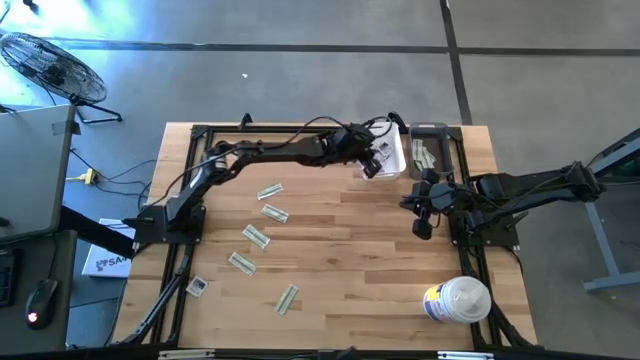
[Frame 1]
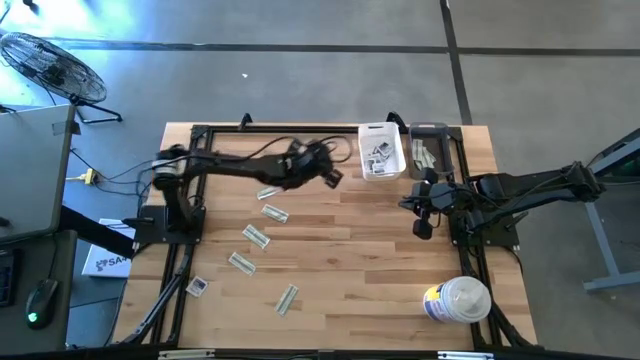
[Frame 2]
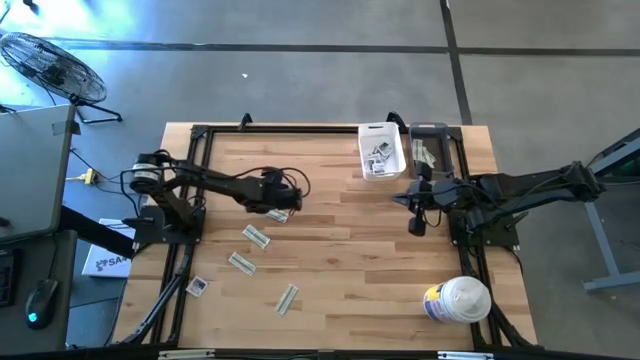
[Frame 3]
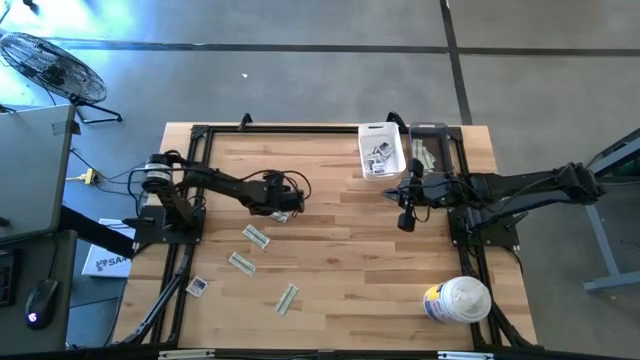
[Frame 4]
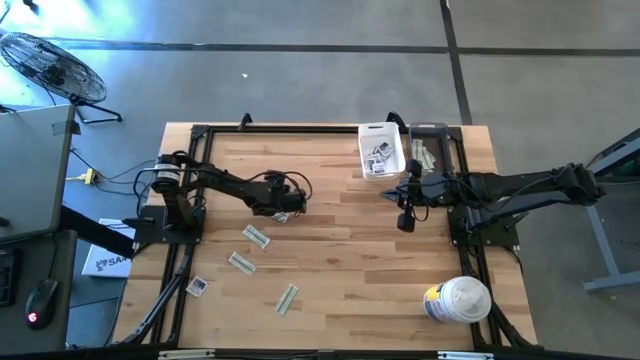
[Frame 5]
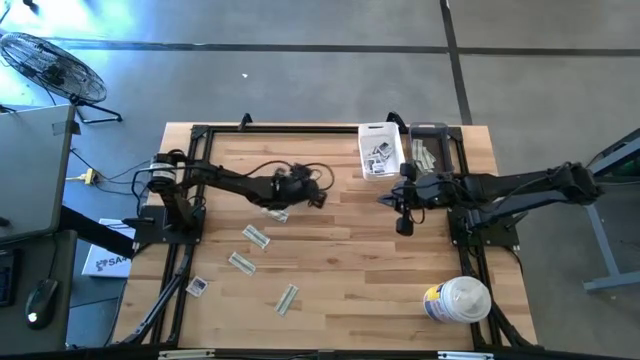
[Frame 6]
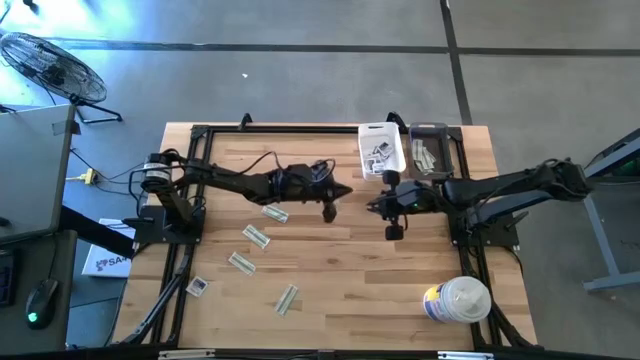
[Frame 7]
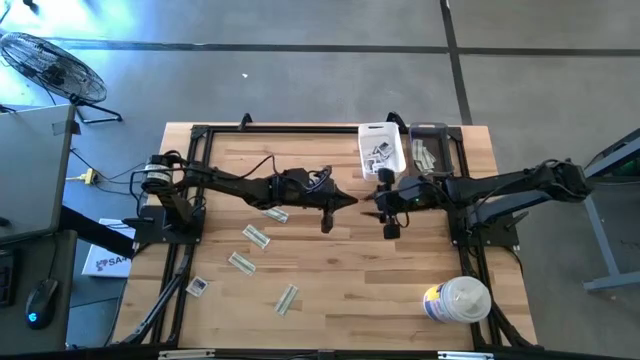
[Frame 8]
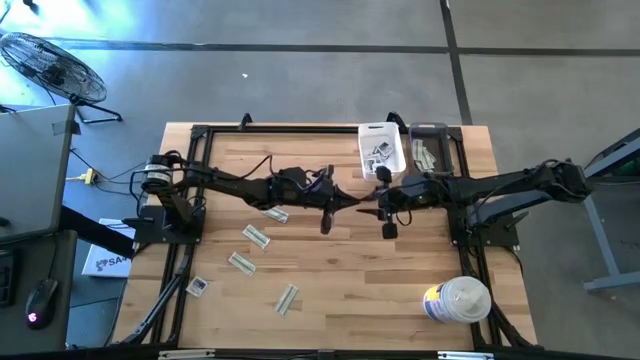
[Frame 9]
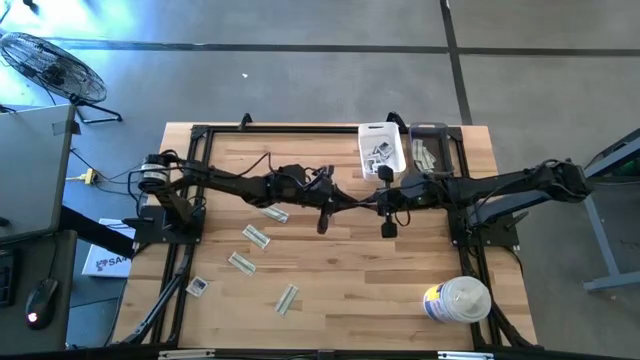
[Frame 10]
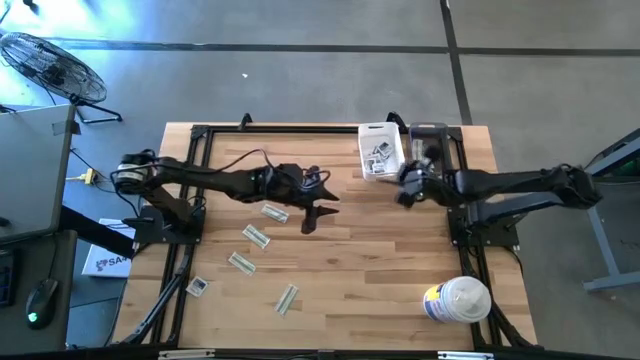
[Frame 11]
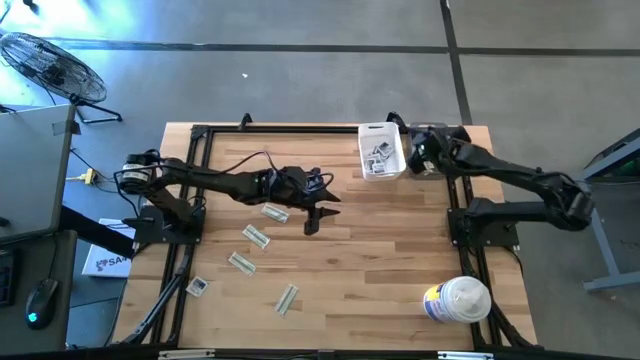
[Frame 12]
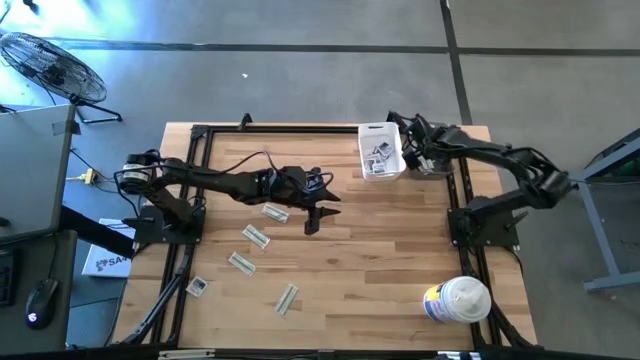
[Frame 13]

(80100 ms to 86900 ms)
Task: Pick & Place First Aid Supplies
Put the bandage into the gray bin

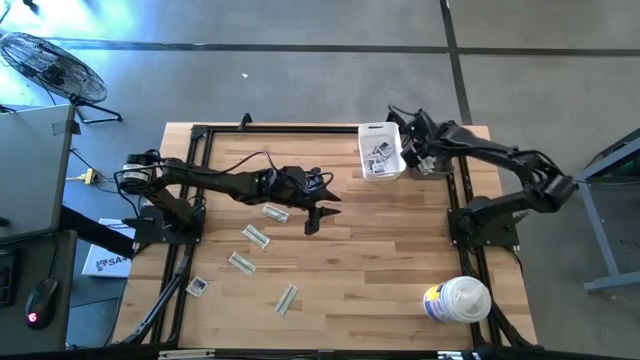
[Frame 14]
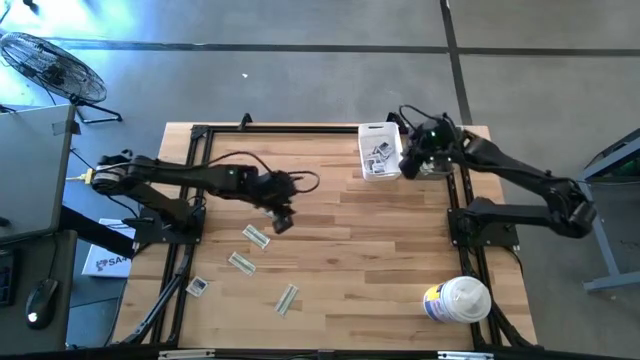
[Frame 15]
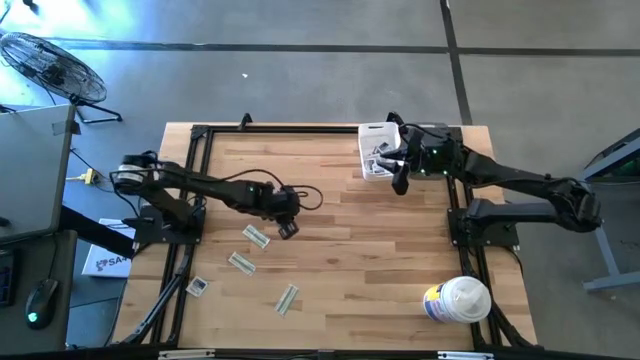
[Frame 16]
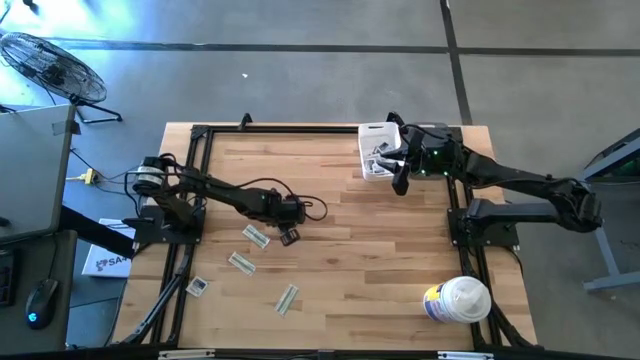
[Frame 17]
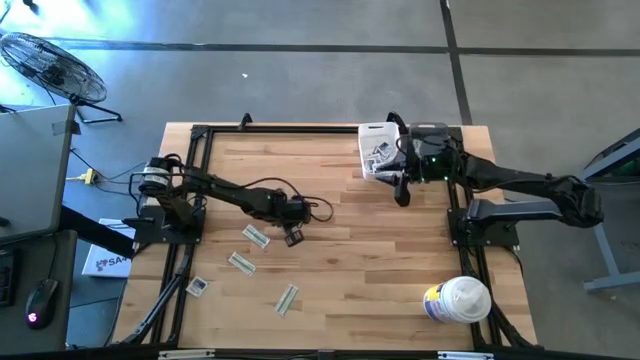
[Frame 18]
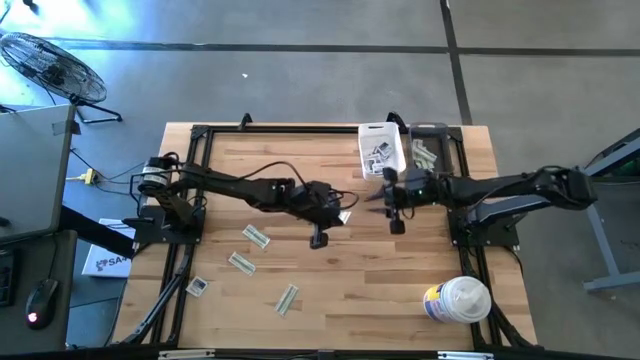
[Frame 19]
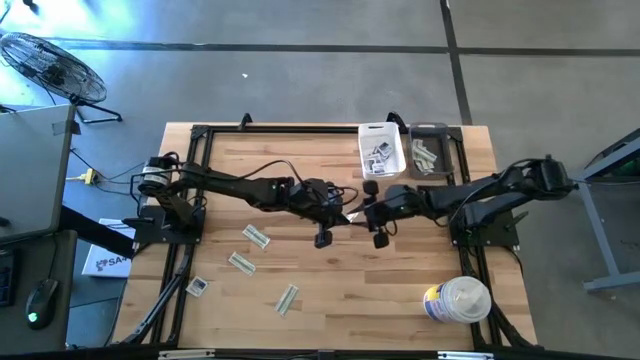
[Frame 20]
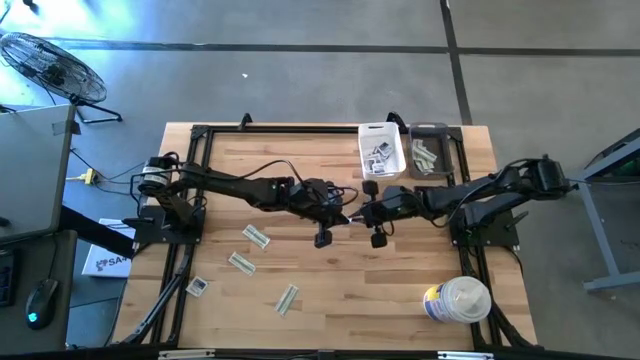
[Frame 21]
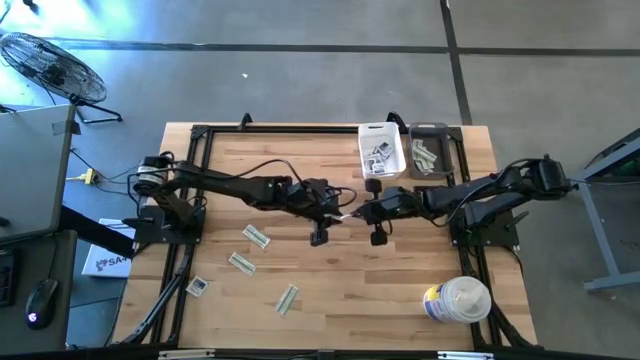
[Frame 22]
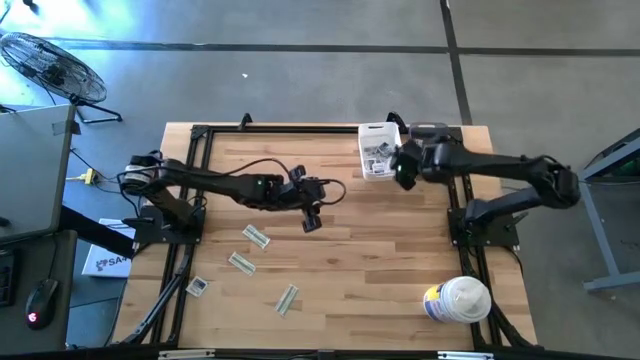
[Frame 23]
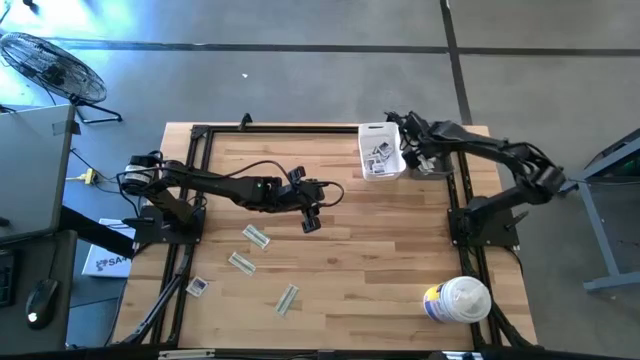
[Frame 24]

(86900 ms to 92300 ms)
Put the bandage into the gray bin

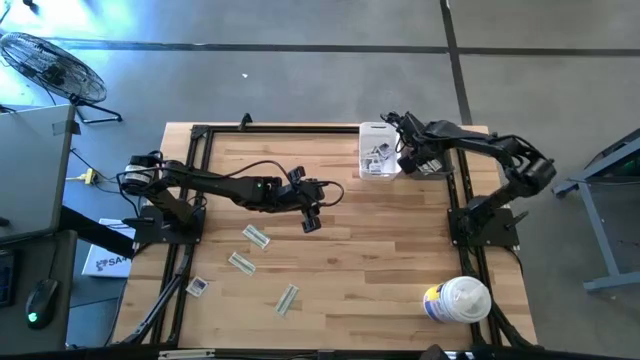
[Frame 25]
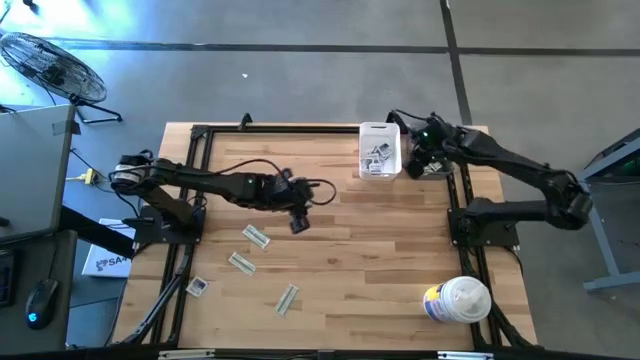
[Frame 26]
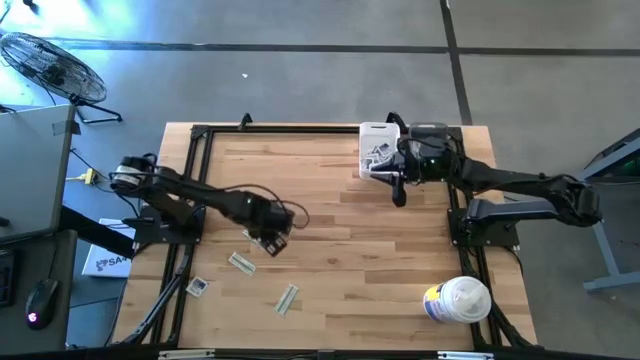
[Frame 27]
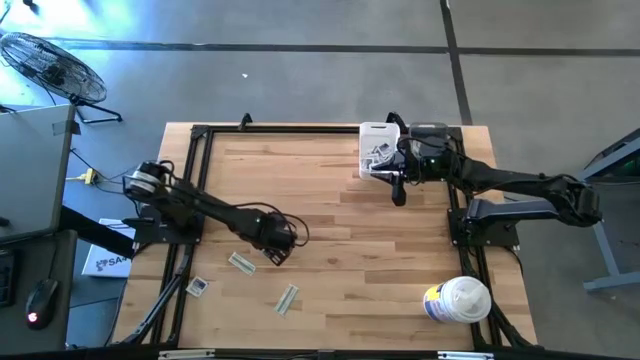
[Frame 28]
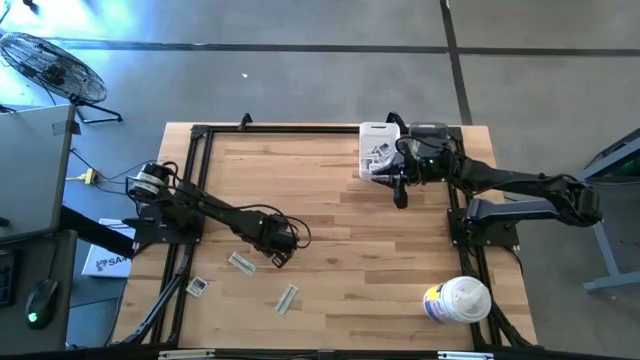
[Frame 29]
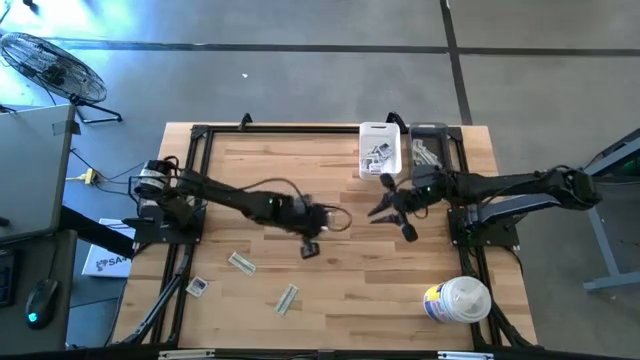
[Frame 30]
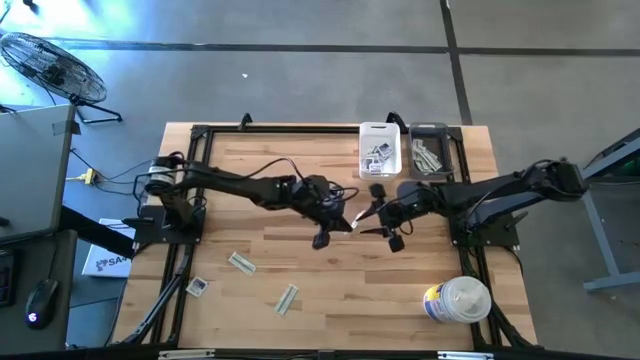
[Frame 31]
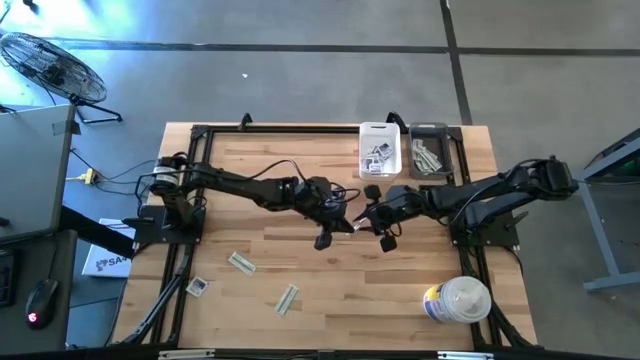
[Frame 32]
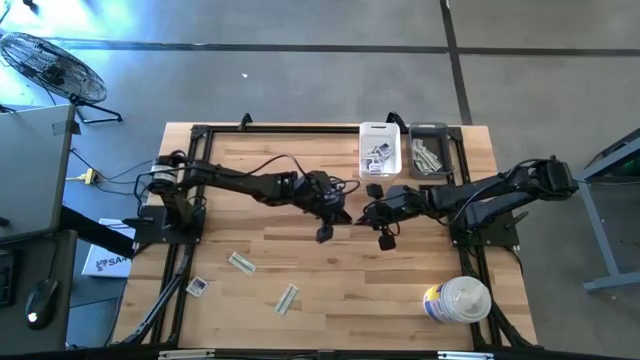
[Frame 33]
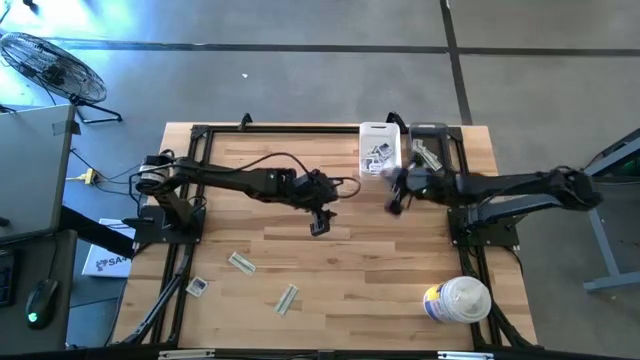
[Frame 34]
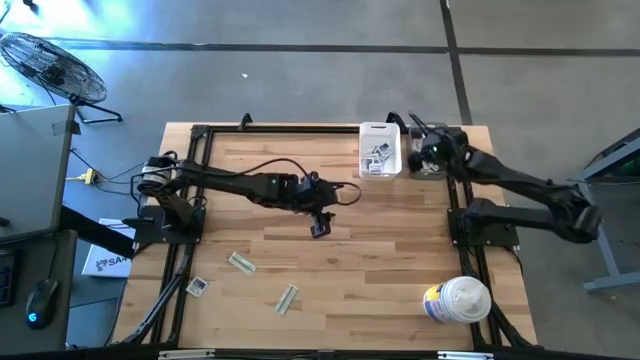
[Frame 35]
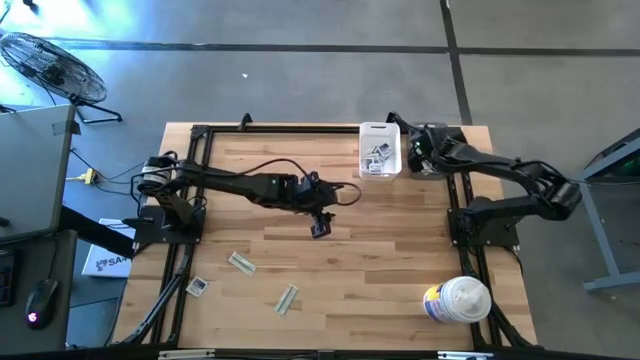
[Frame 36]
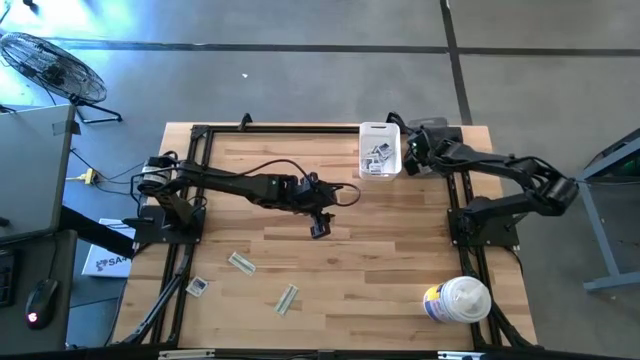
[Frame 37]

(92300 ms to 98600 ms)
Put the bandage into the gray bin

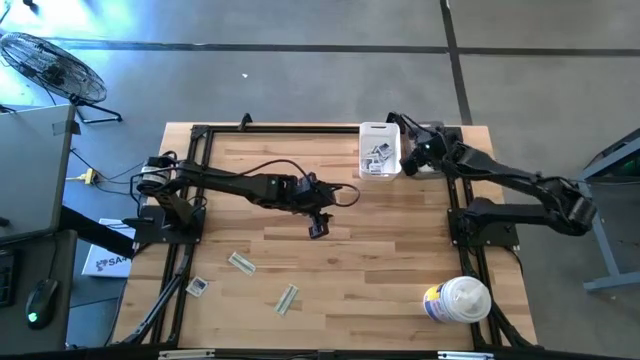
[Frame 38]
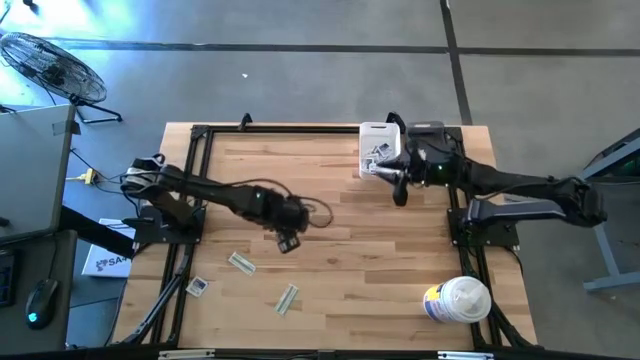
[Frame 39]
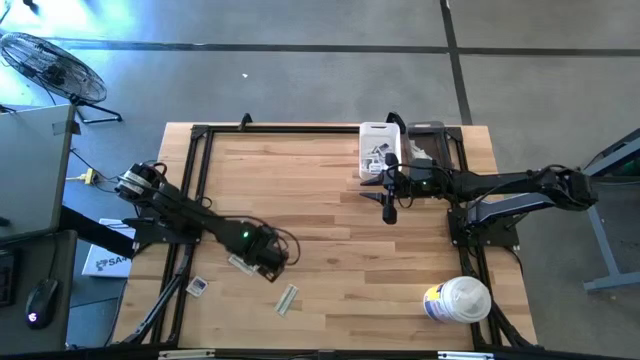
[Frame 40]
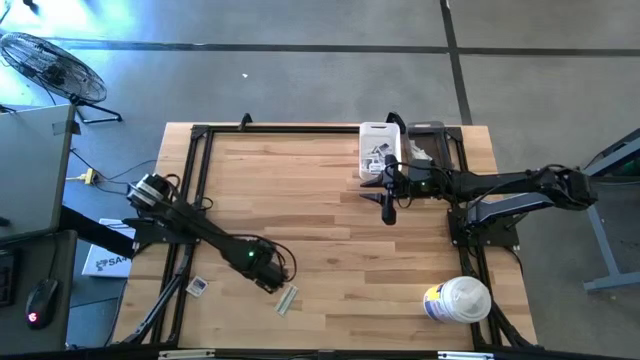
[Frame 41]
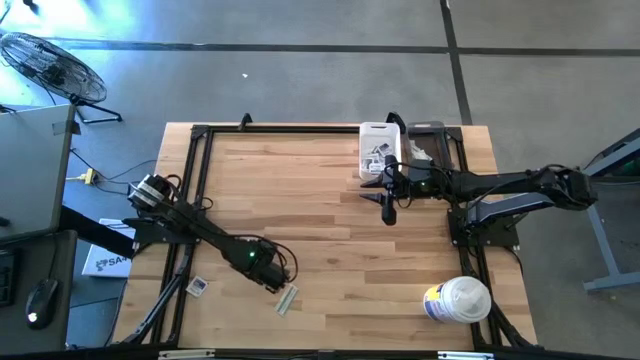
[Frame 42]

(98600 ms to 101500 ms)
Put the bandage into the gray bin
